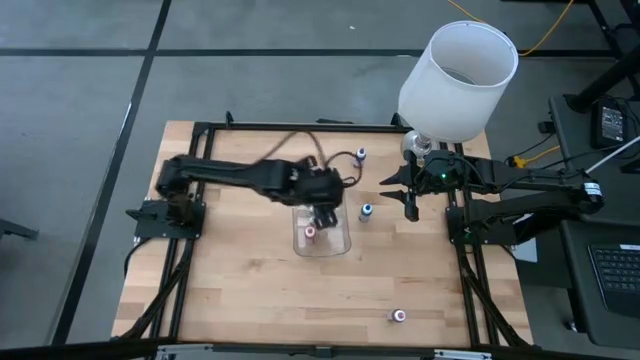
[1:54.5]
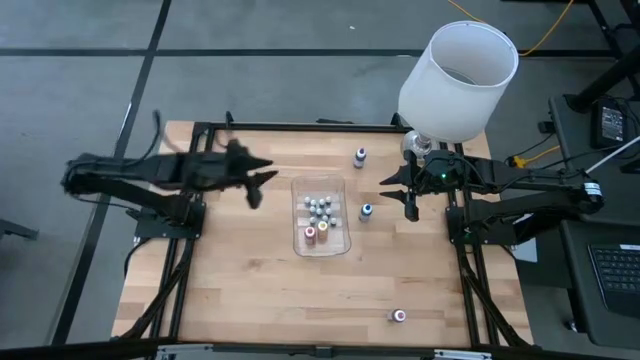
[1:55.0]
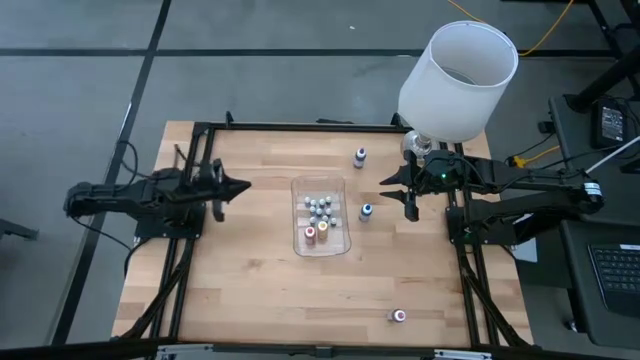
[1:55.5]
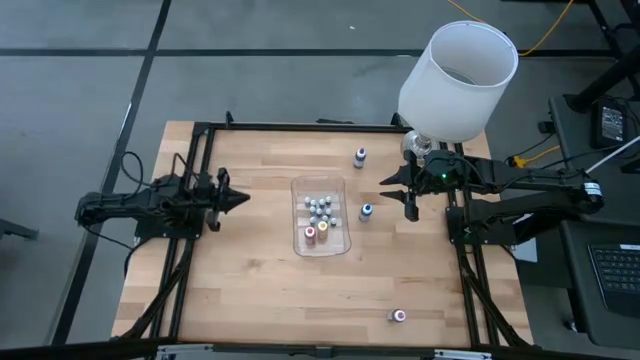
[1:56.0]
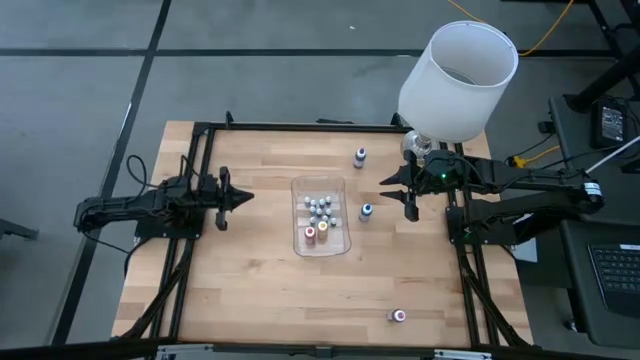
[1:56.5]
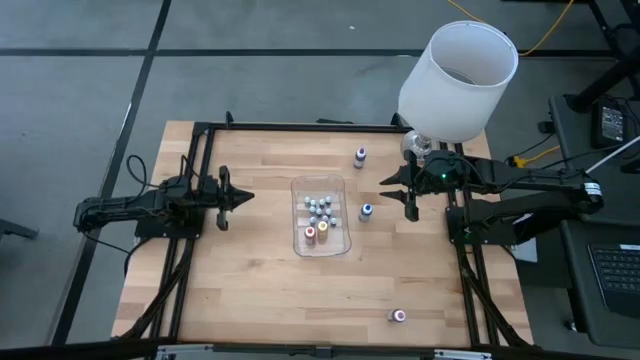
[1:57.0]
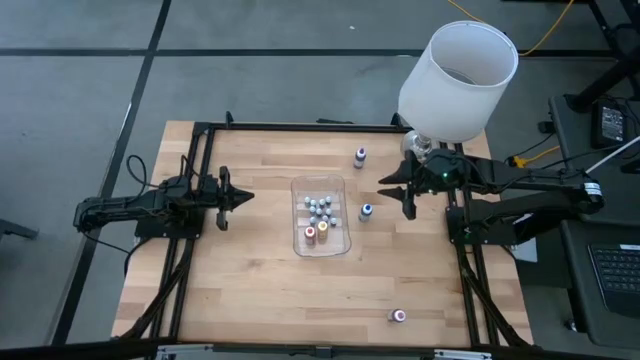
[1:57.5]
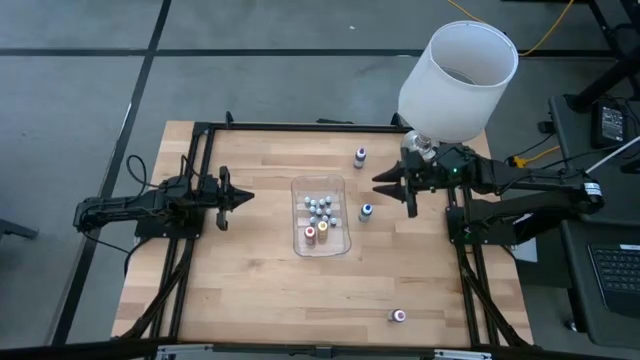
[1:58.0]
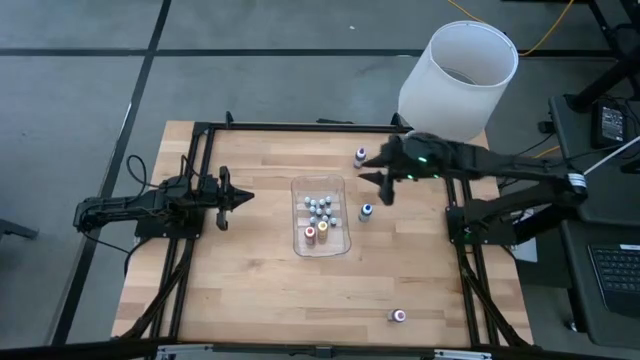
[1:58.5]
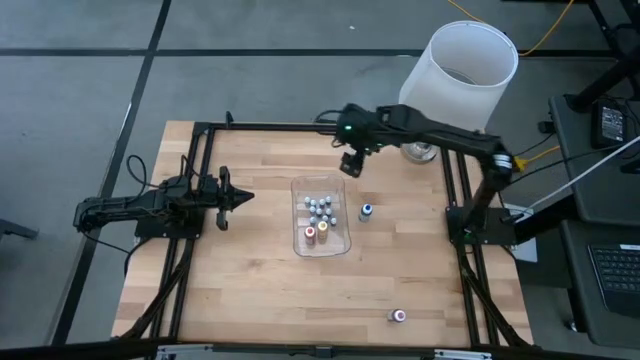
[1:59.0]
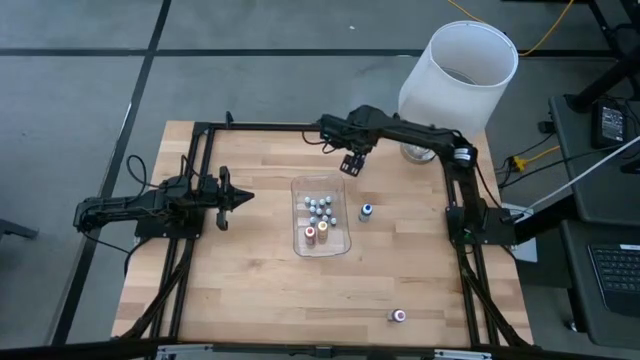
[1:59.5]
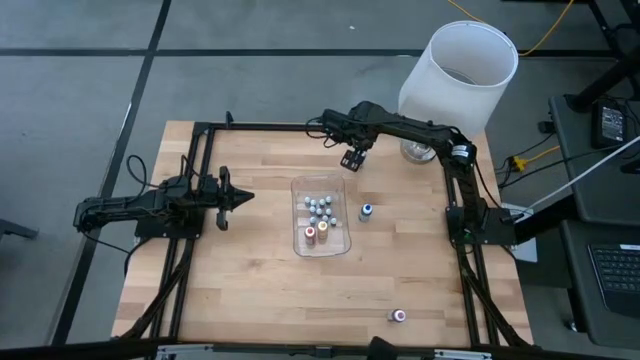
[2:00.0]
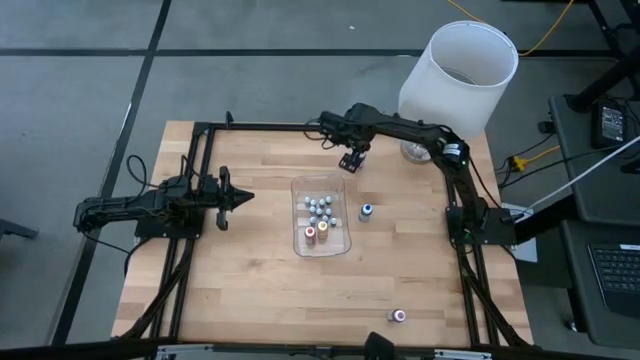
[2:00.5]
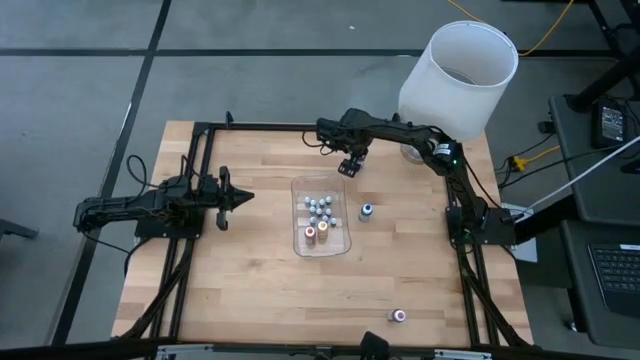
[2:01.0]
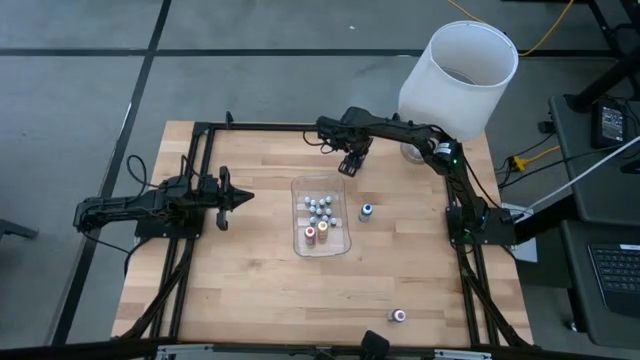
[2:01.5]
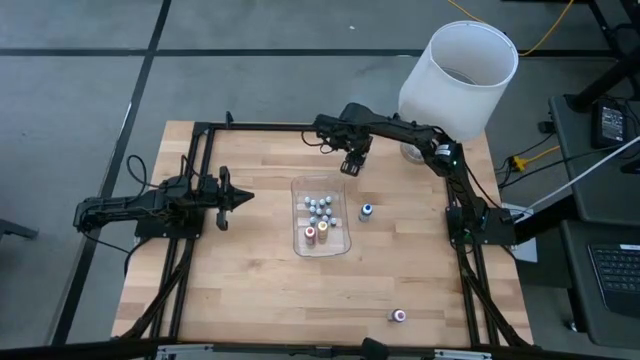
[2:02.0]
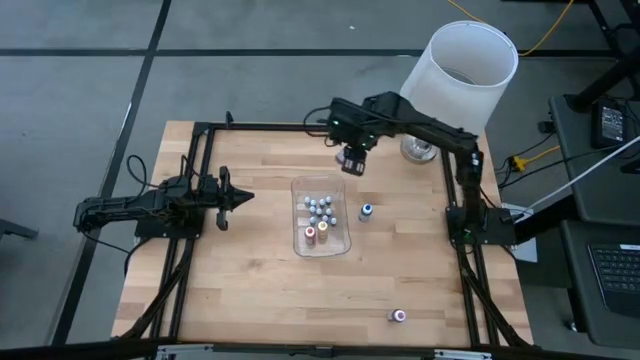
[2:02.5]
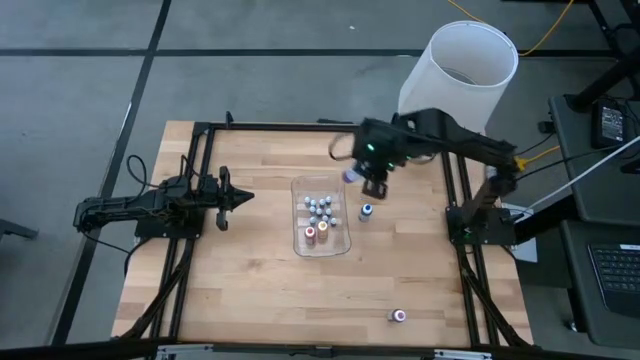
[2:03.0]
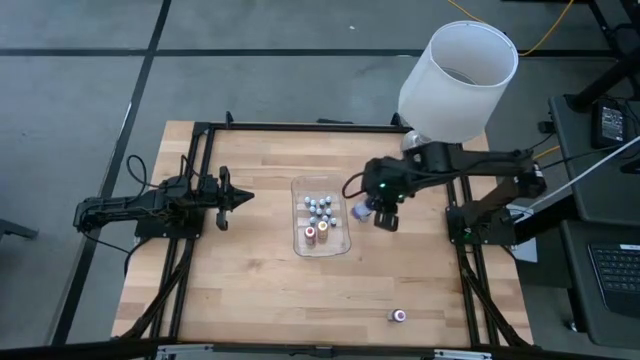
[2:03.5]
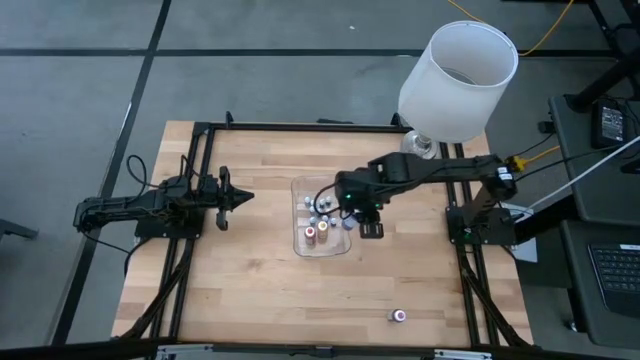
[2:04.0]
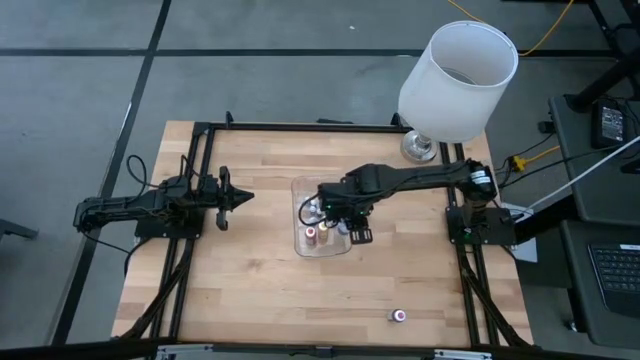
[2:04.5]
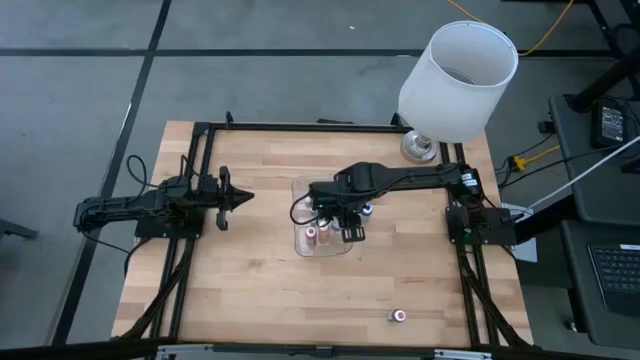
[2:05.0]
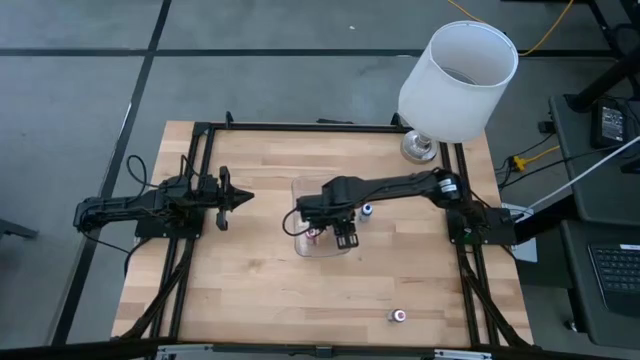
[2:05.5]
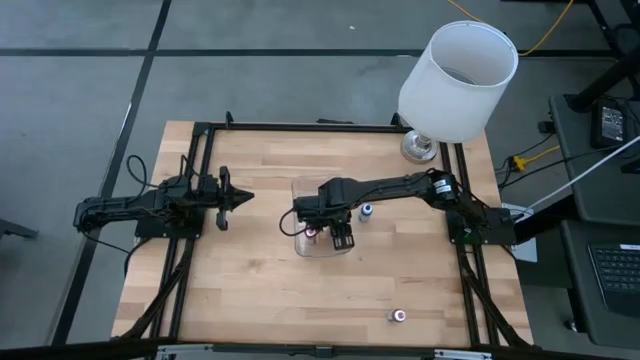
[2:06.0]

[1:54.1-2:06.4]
Task: Pick & Place food coloring
Put the large purple food coloring into the transparent bin

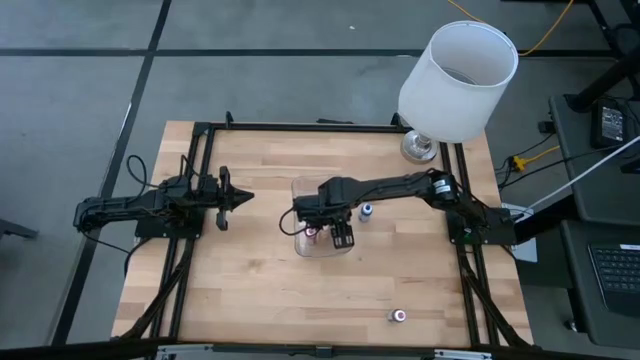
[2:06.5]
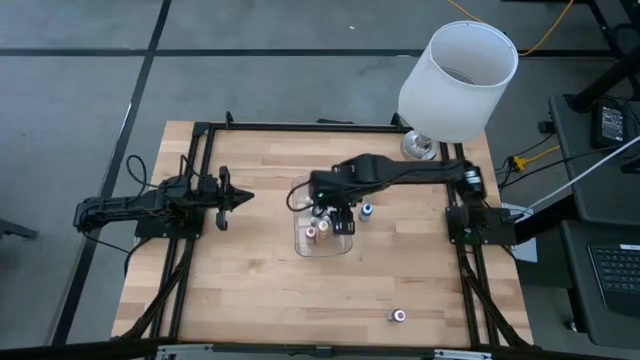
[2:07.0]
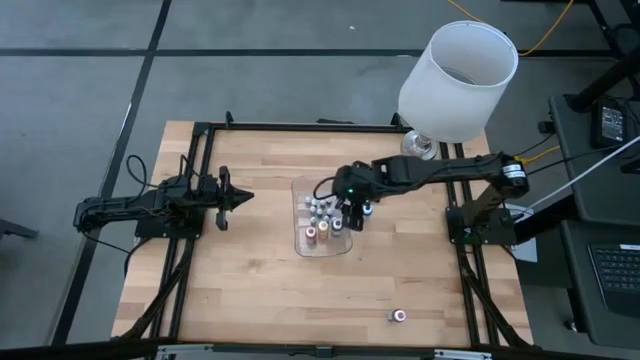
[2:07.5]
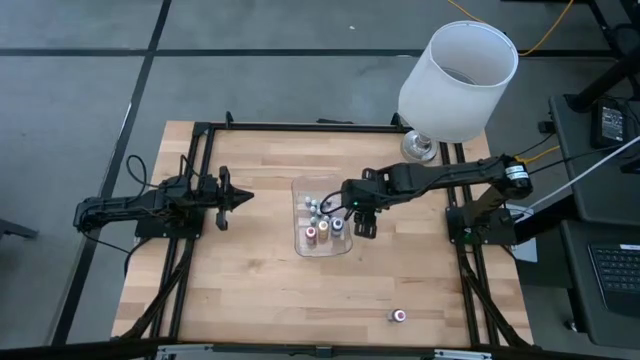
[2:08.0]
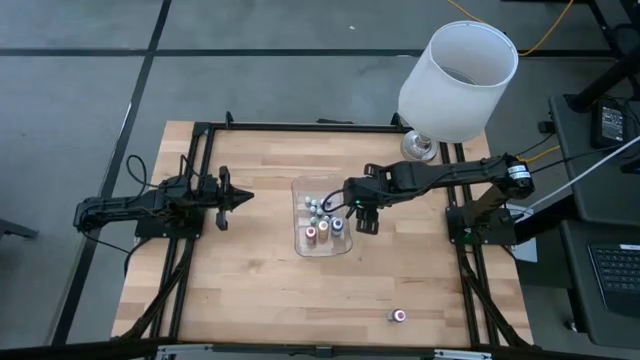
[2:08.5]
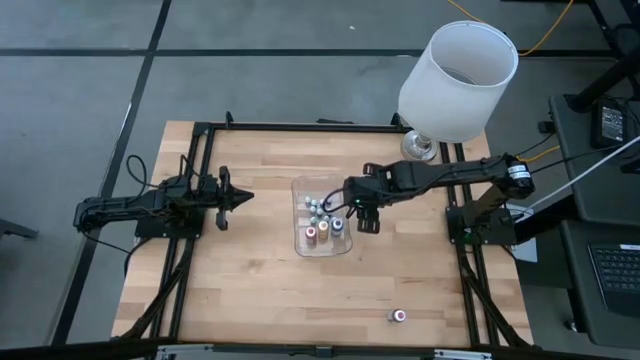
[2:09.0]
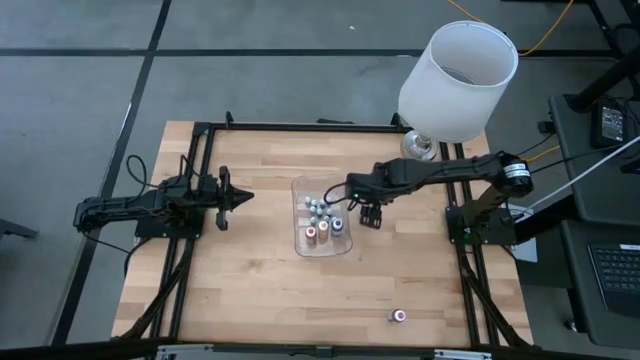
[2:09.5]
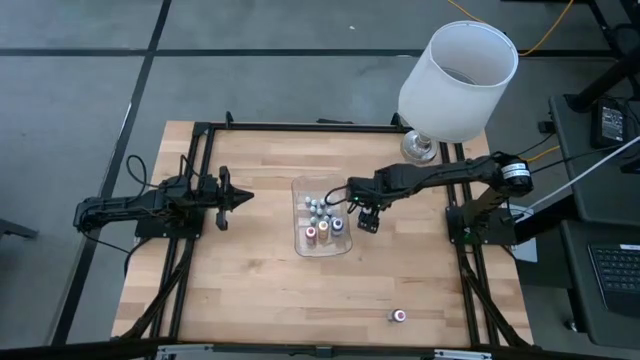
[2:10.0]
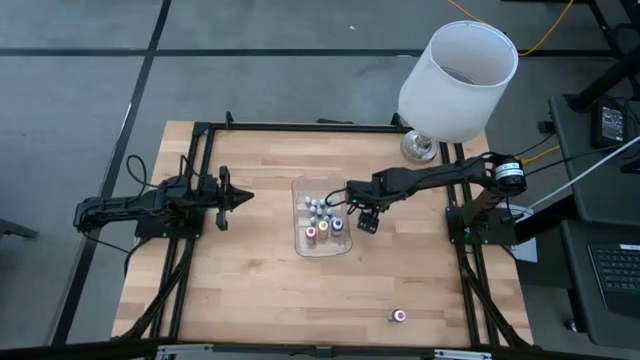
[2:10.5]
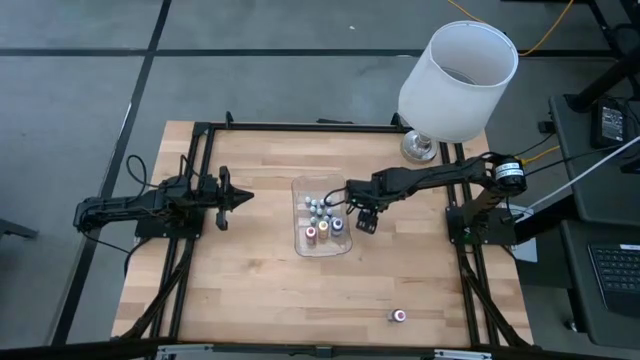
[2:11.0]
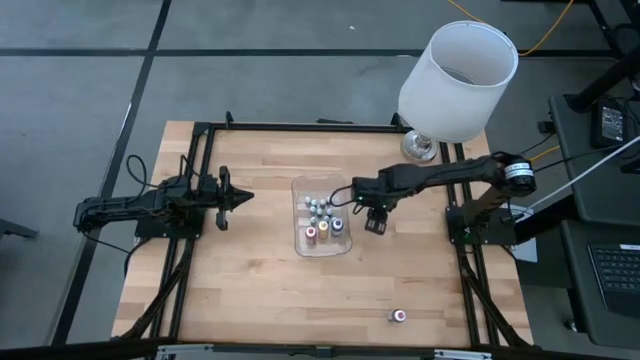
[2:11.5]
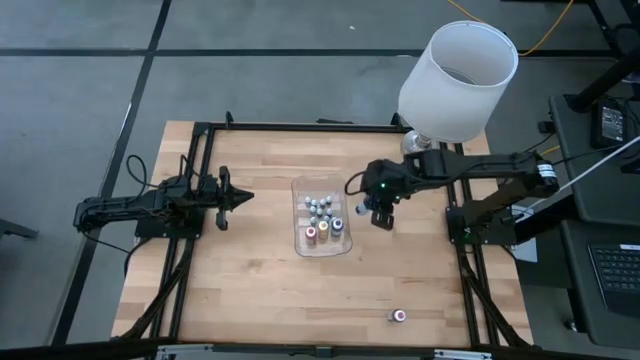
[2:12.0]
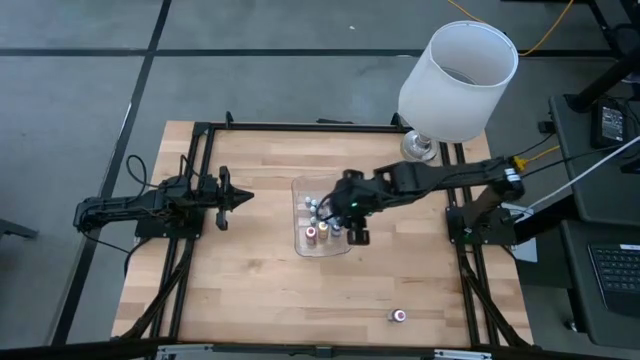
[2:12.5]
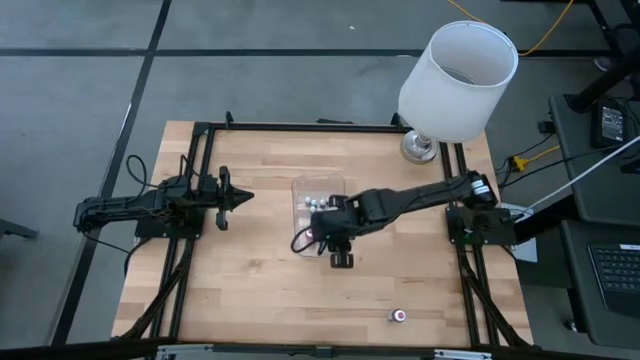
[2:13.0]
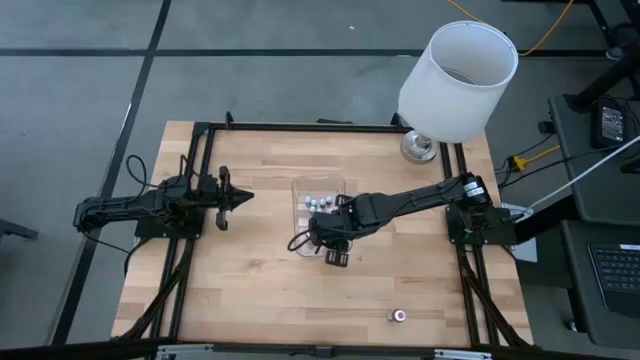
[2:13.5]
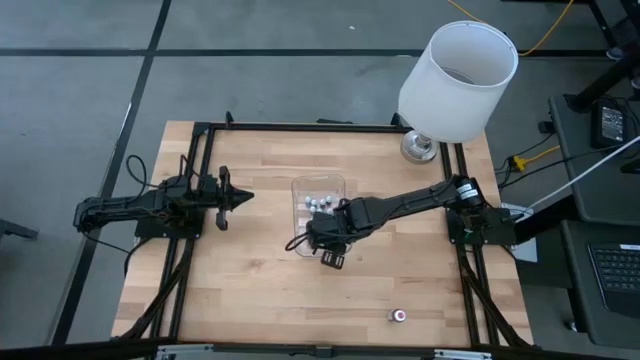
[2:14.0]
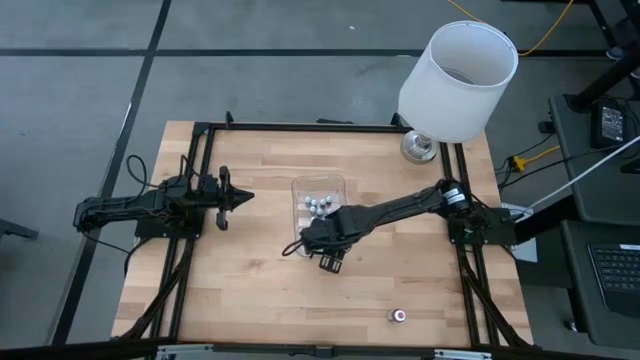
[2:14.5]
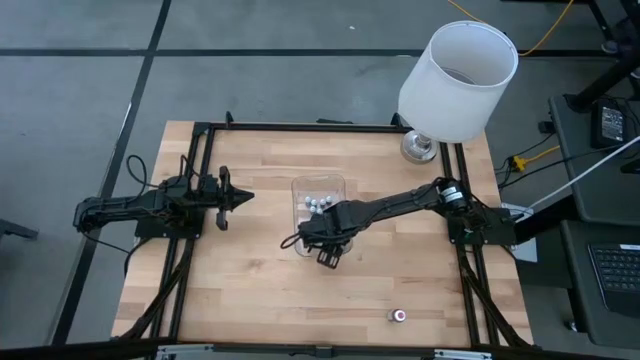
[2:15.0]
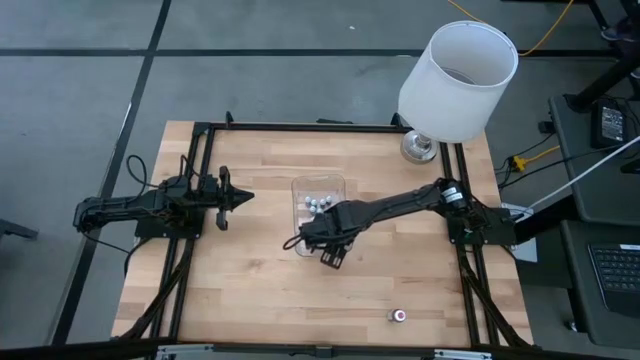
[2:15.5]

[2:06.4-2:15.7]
Put the large blue food coloring into the transparent bin
